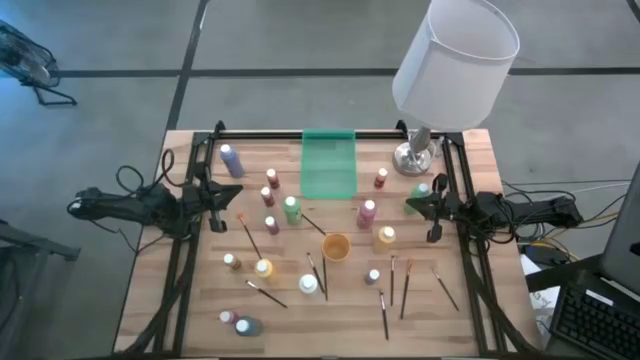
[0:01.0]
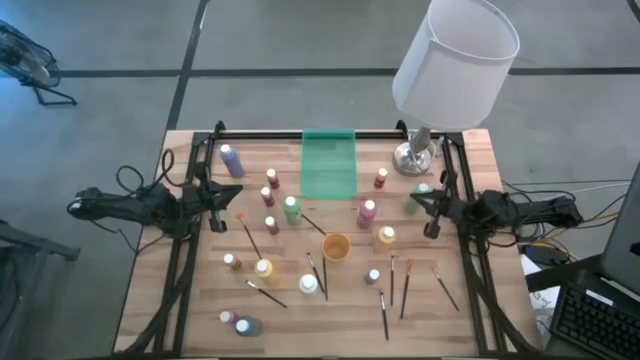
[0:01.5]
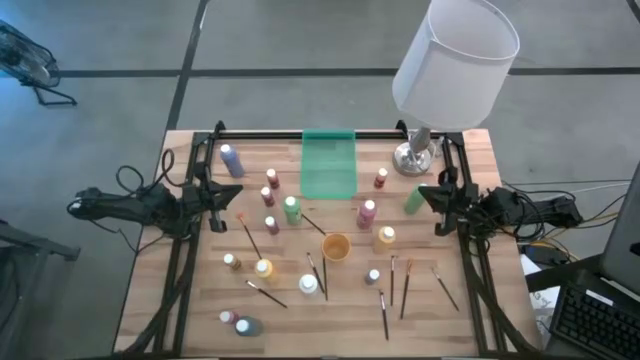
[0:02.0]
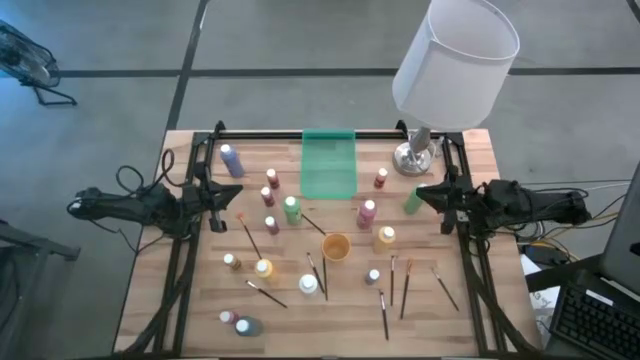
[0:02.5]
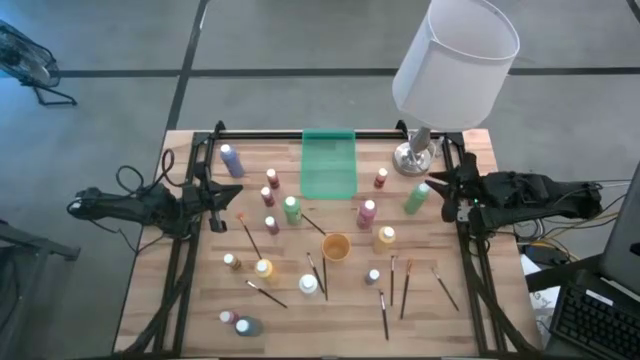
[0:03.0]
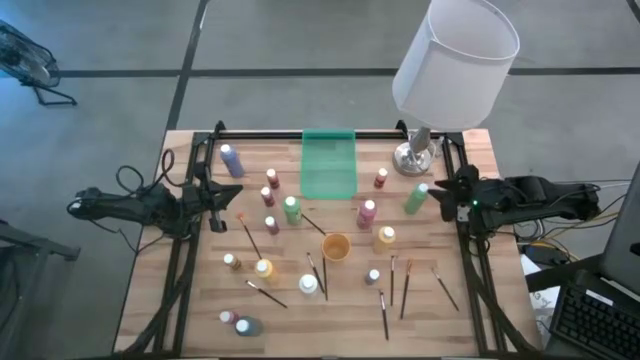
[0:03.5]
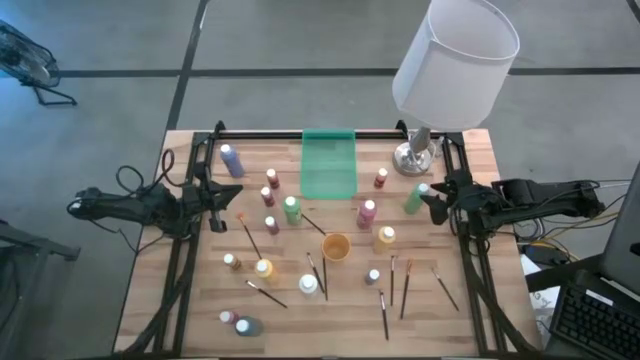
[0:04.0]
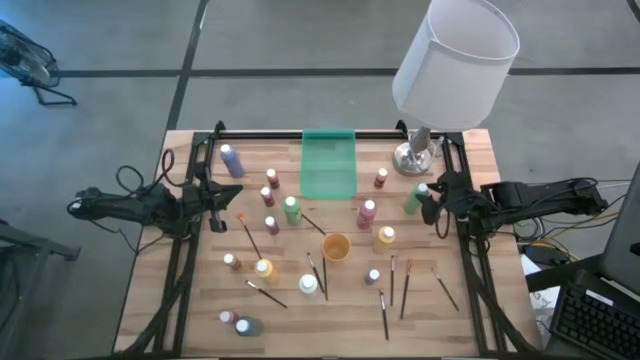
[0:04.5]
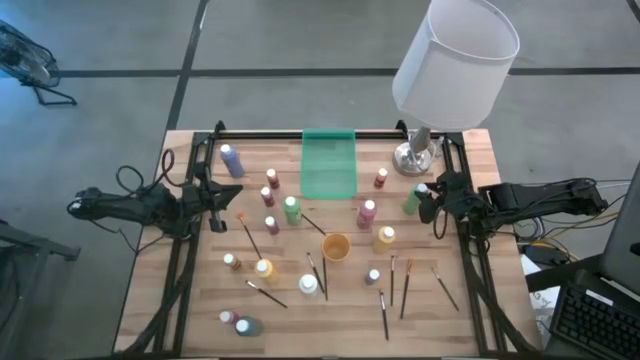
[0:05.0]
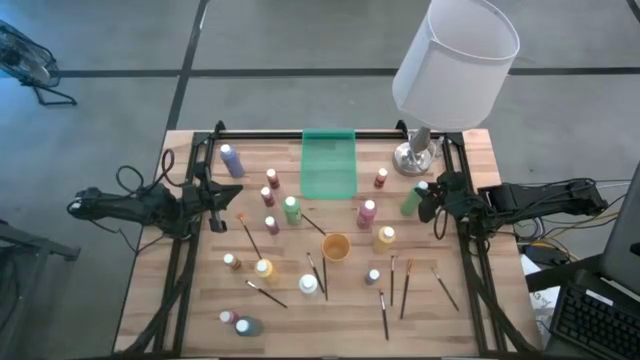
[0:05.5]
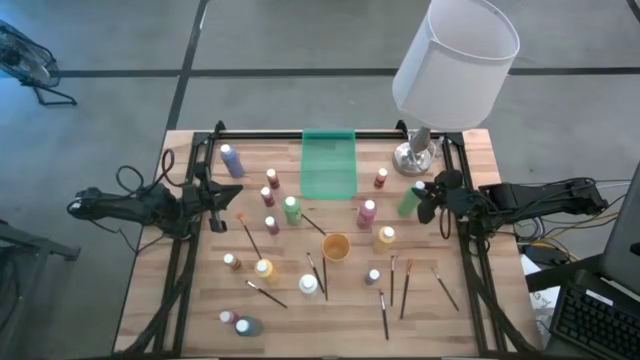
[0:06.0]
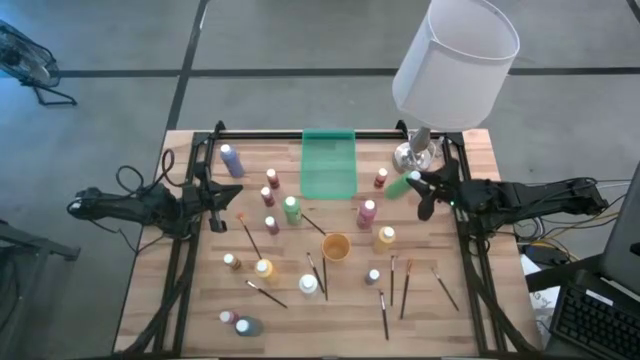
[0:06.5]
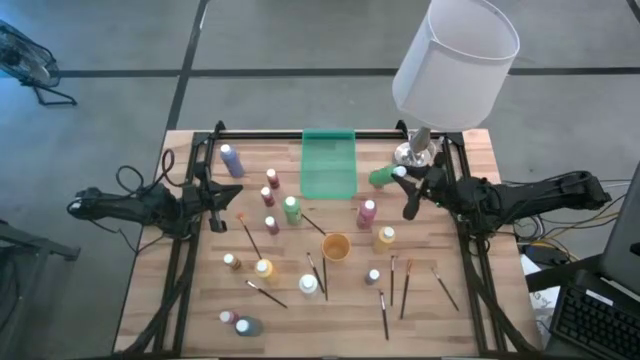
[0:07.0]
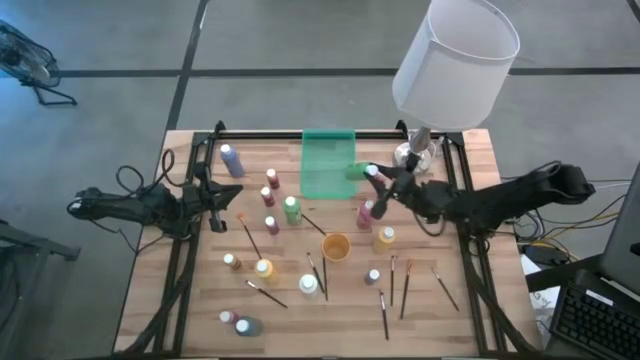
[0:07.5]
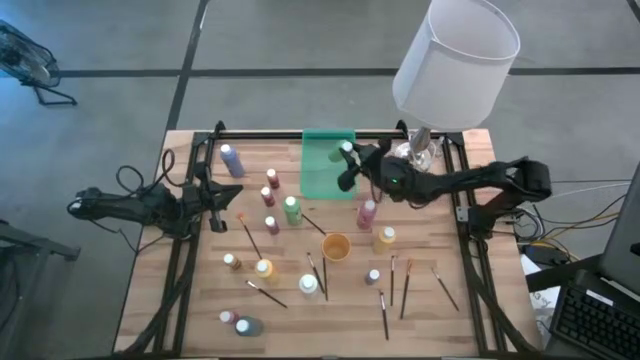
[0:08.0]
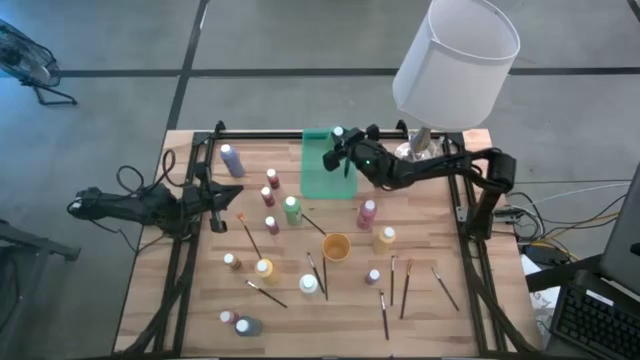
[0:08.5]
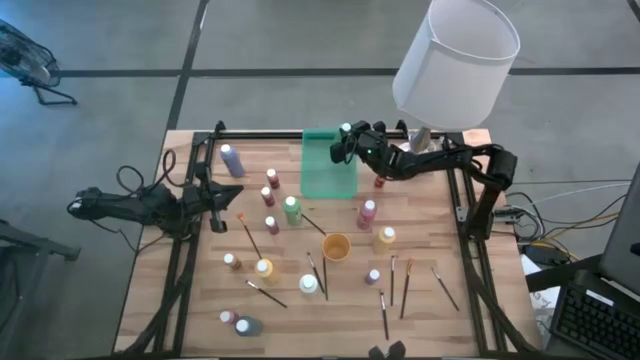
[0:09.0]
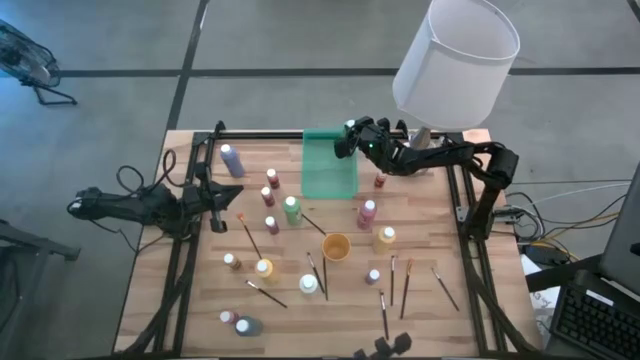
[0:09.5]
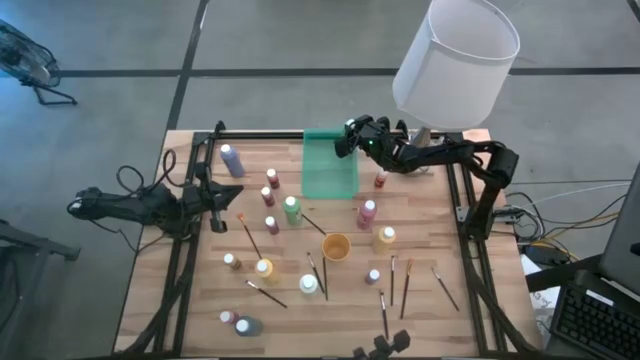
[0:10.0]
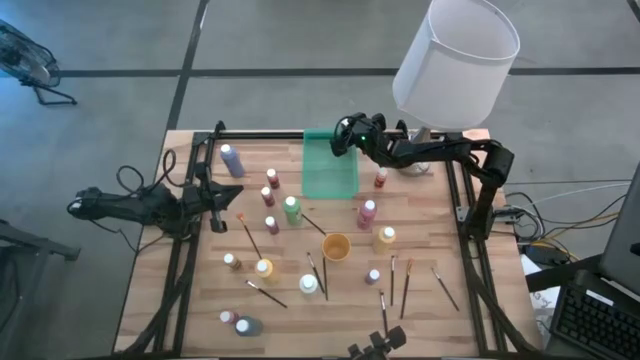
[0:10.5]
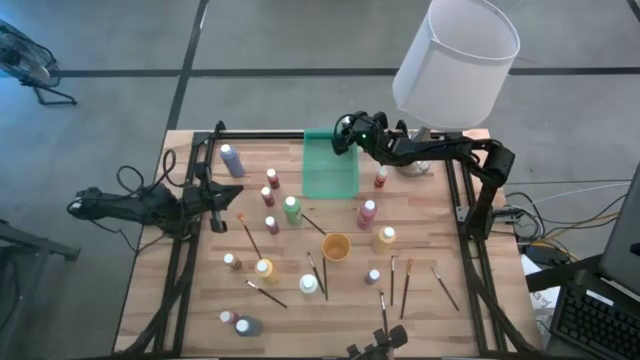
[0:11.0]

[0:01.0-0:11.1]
Task: Pick & Place Paint Supplies
Put the green paint bottle into the green bin

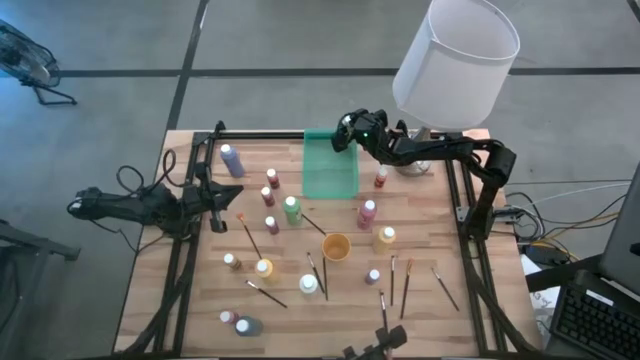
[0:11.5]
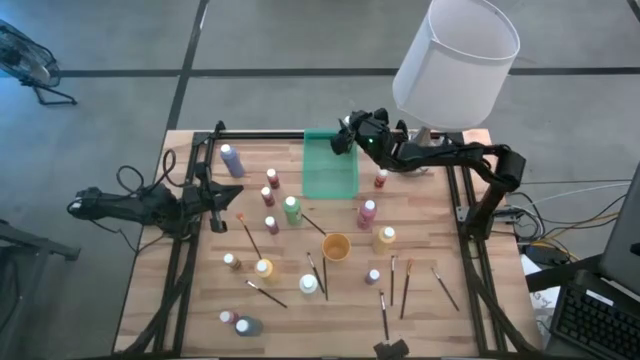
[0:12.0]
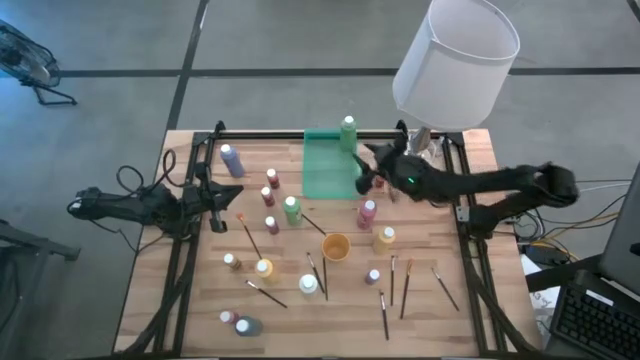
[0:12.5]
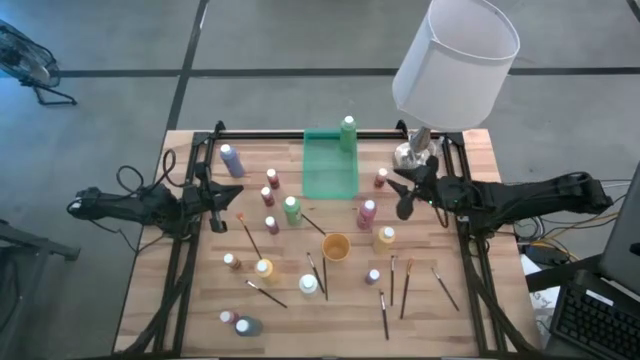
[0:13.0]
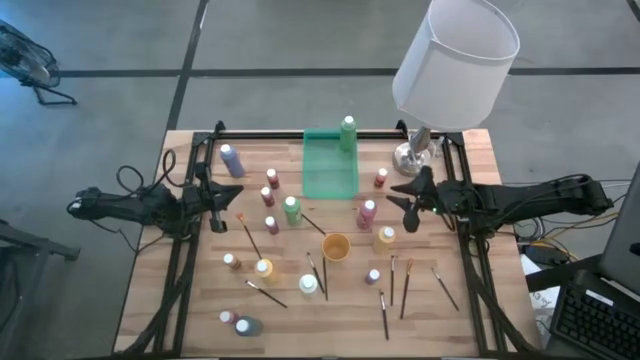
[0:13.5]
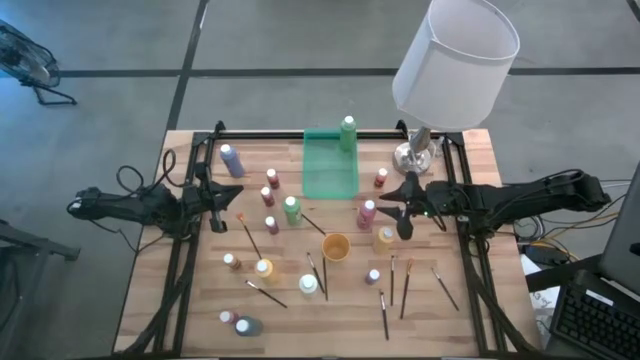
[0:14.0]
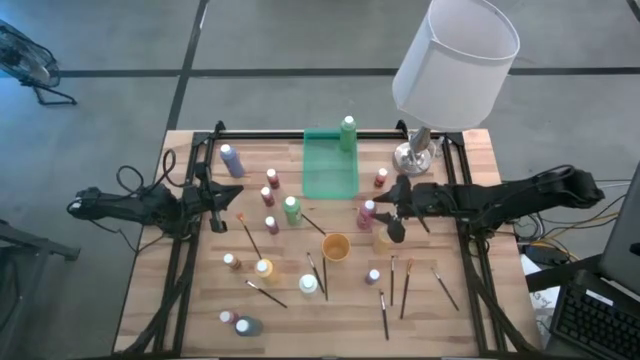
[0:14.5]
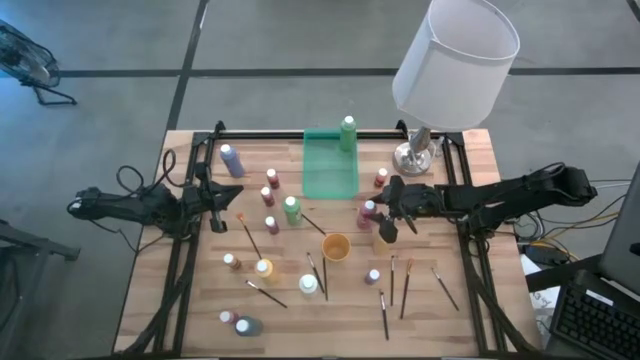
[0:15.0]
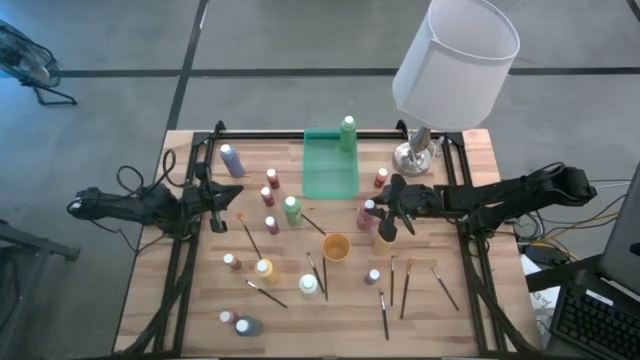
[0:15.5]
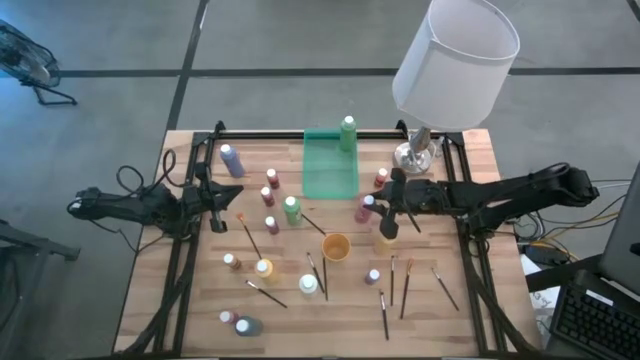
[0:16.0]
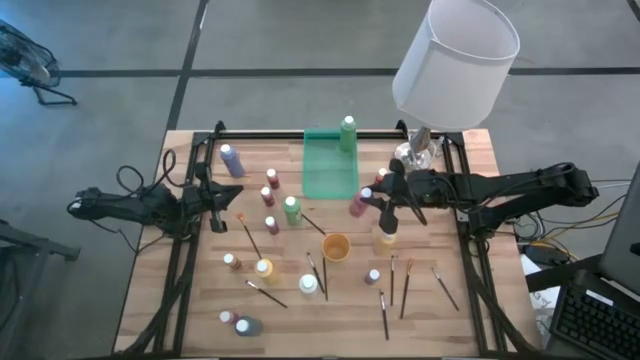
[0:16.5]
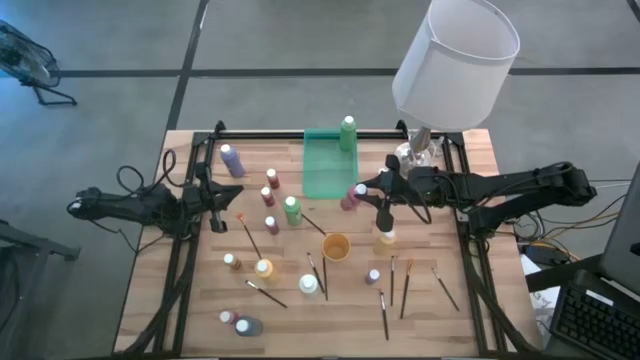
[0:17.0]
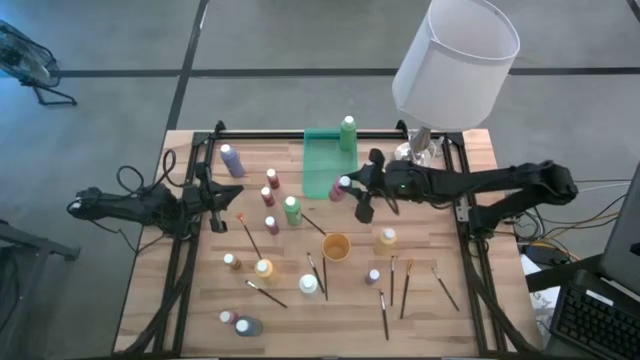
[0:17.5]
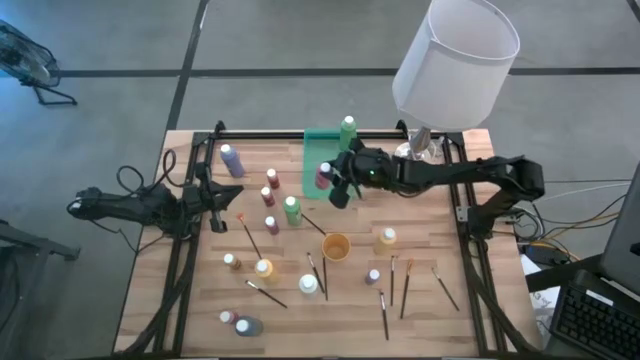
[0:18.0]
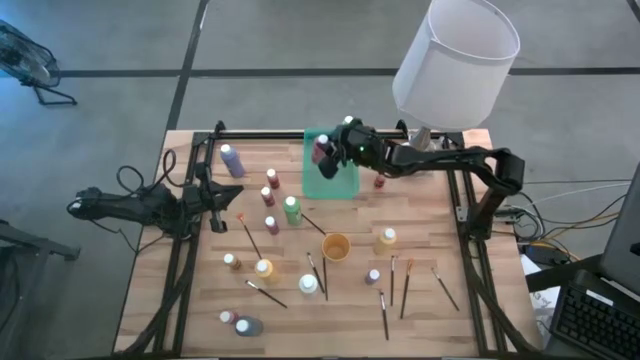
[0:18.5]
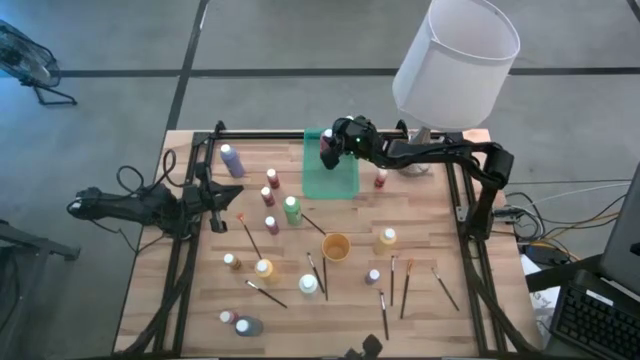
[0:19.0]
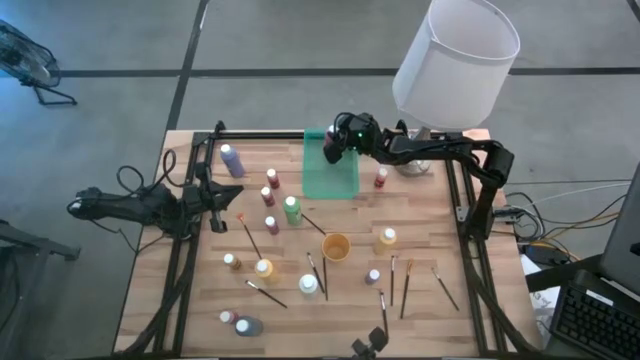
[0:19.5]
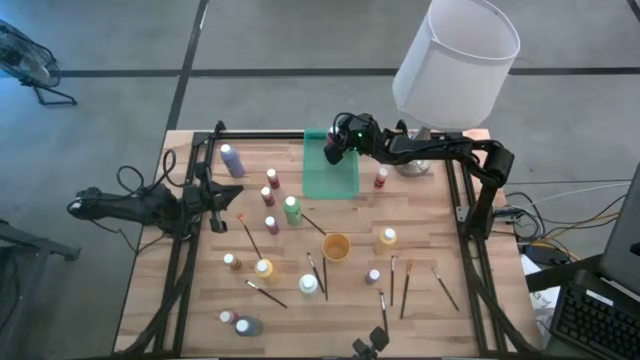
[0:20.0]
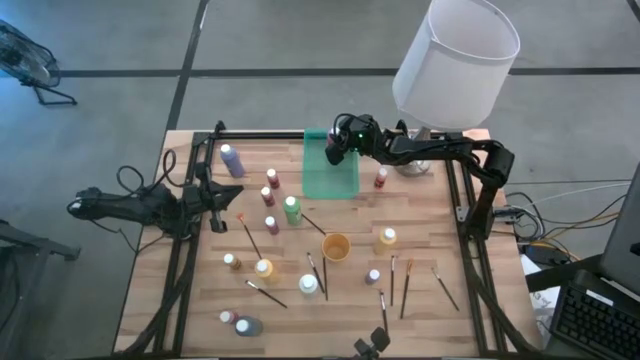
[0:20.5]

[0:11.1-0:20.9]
Put the large pink paint bottle into the green bin

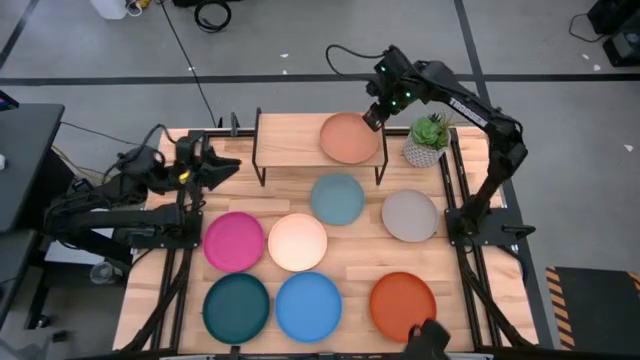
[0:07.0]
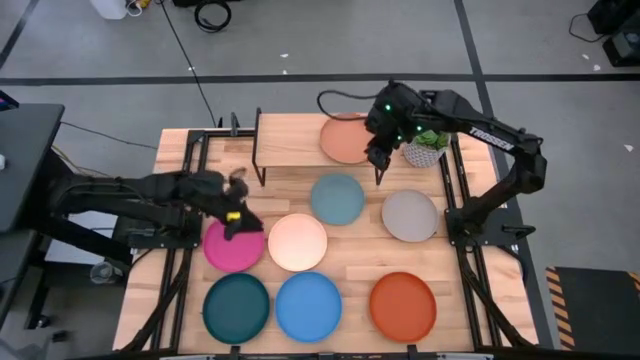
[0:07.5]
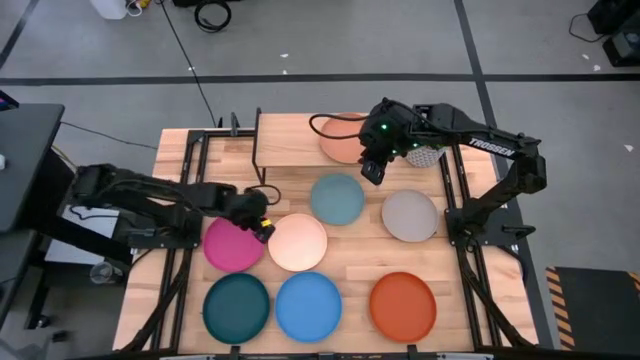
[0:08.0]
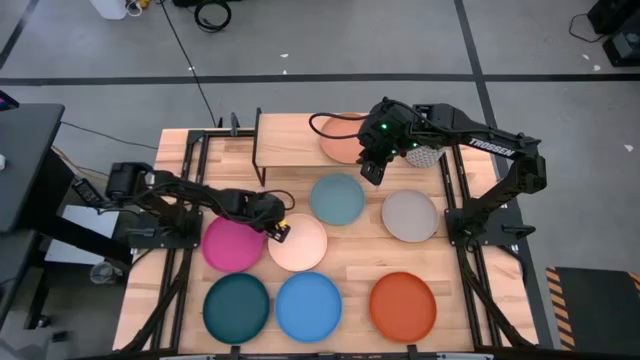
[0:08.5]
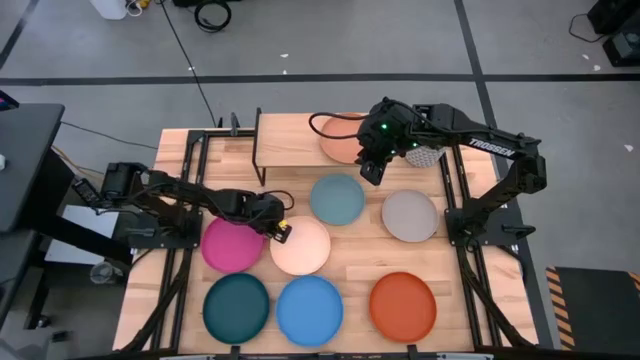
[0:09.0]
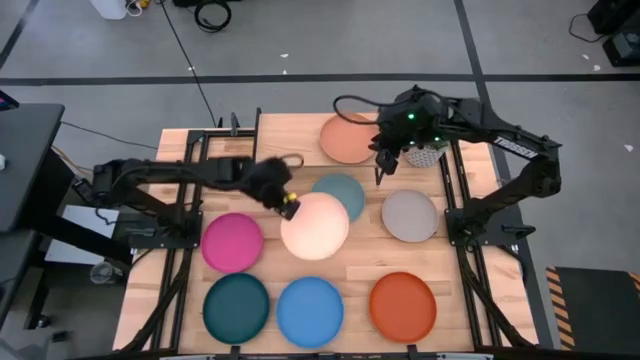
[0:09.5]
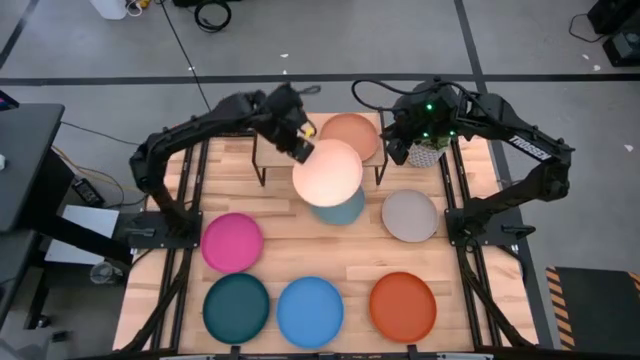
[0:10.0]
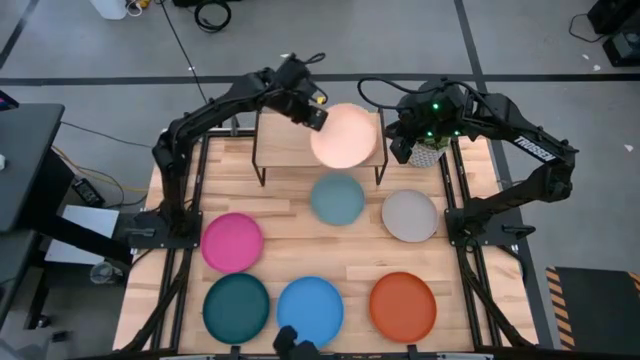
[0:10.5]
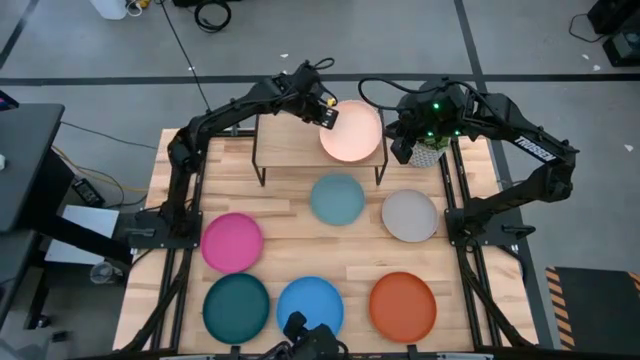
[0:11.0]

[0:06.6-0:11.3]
Task: Place and stack plates onto a shelf
Stack the white plate on top of the brown plate on the shelf
